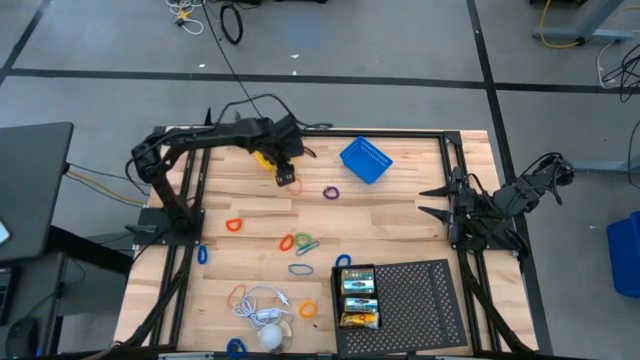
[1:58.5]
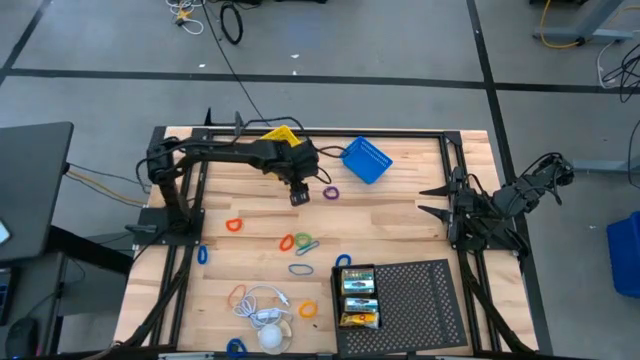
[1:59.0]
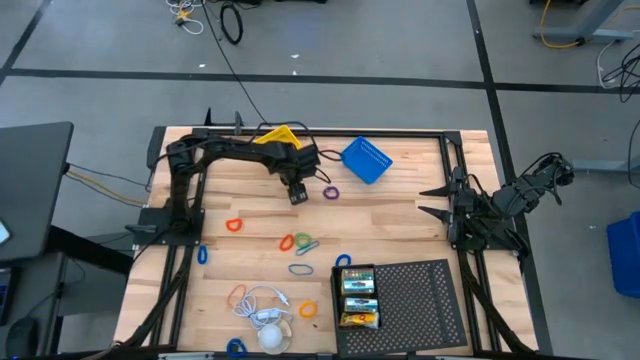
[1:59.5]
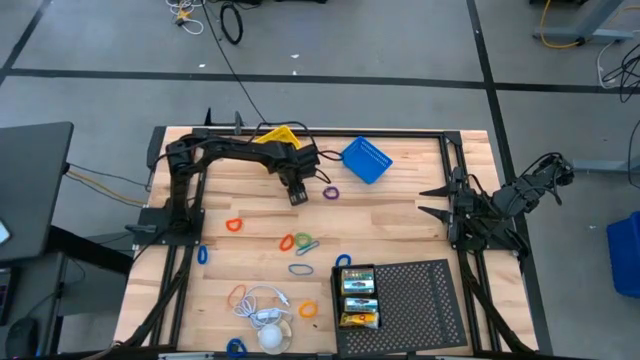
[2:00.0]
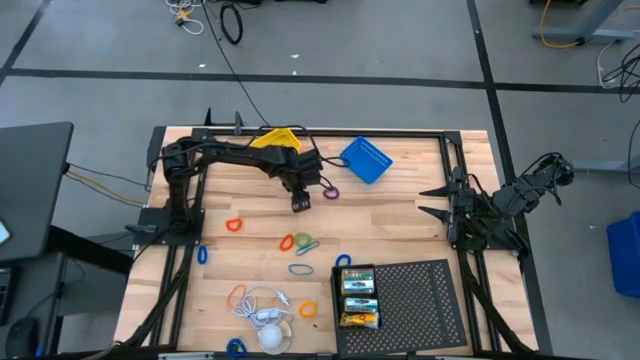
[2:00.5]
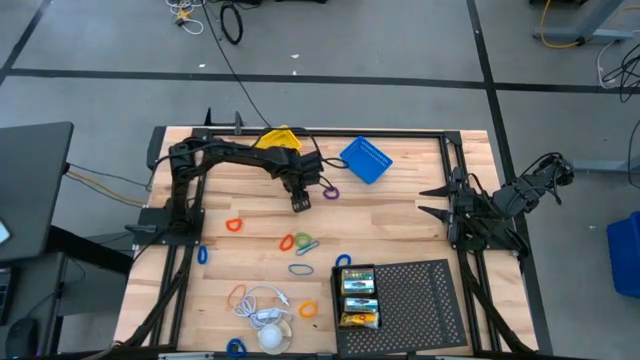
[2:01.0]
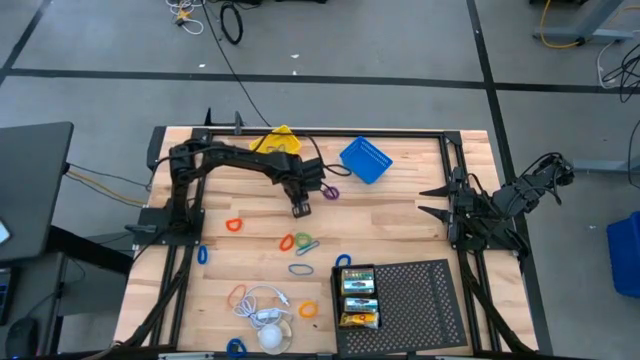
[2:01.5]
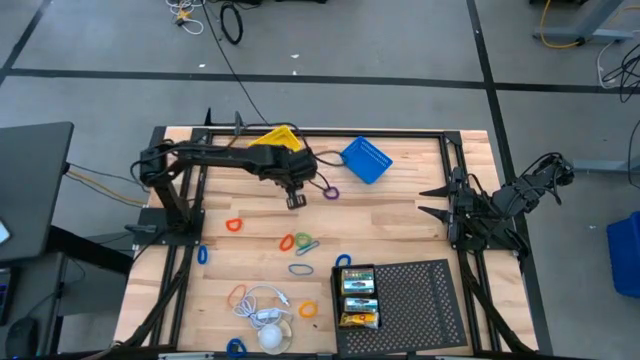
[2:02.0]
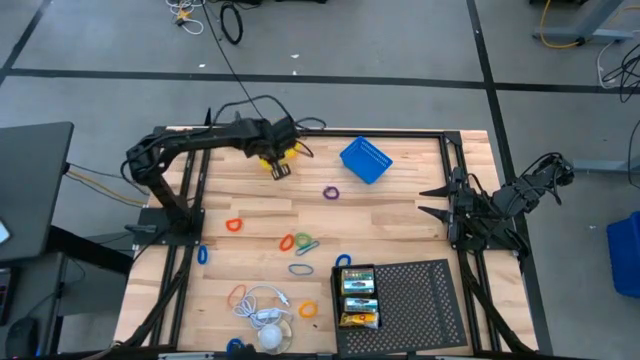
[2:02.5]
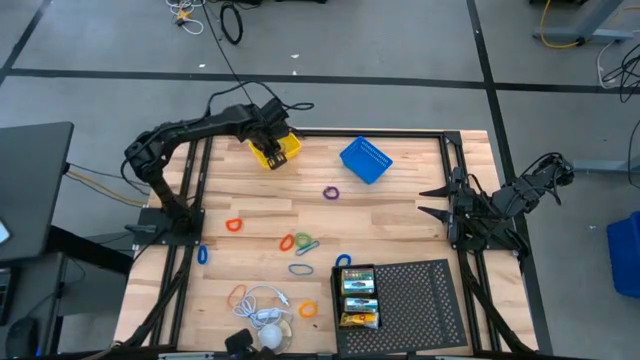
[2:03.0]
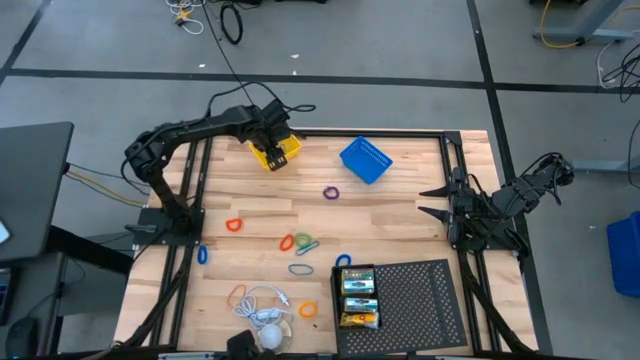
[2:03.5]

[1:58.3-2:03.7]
Task: Pick & Place Office Desk Supplies
Put the orange rubber band into the yellow basket

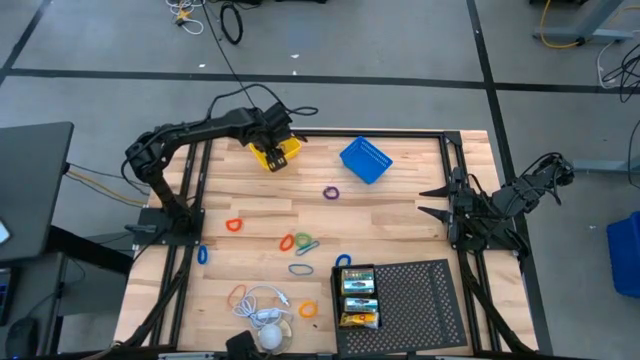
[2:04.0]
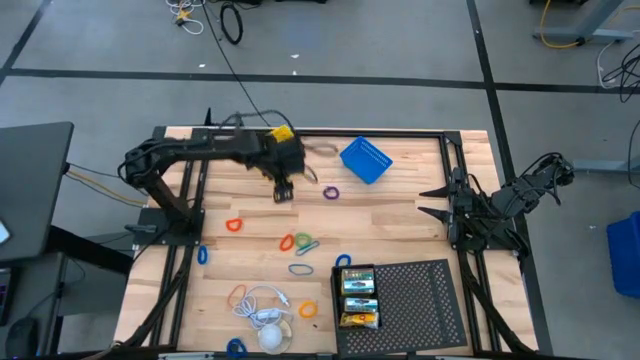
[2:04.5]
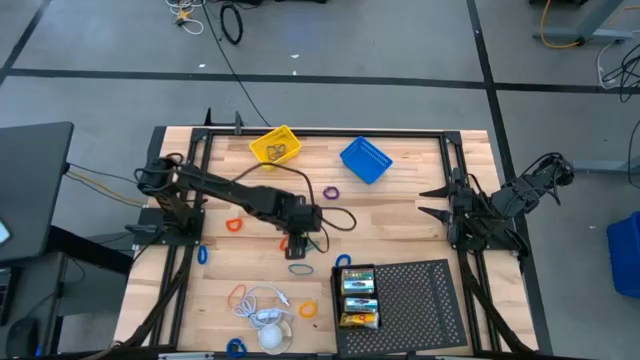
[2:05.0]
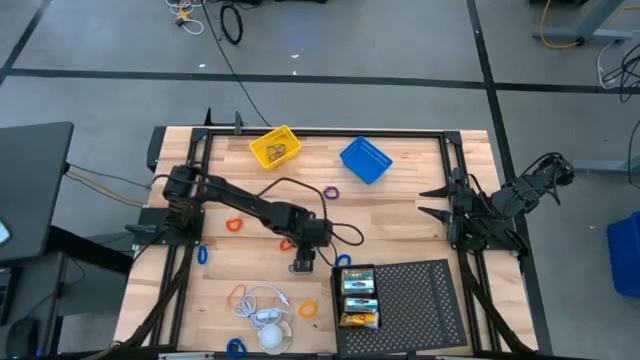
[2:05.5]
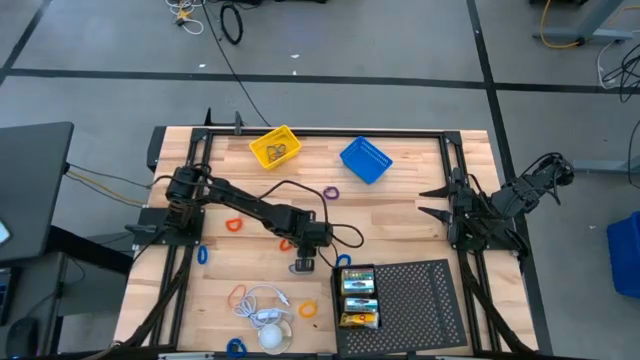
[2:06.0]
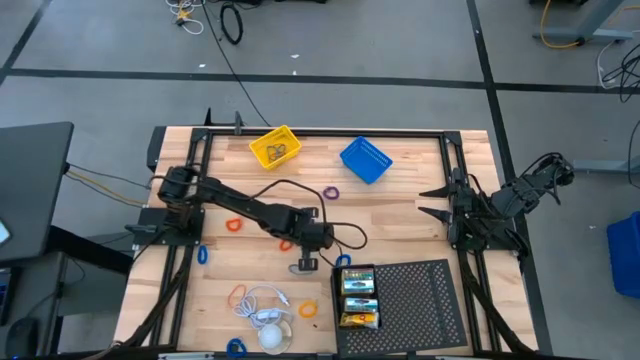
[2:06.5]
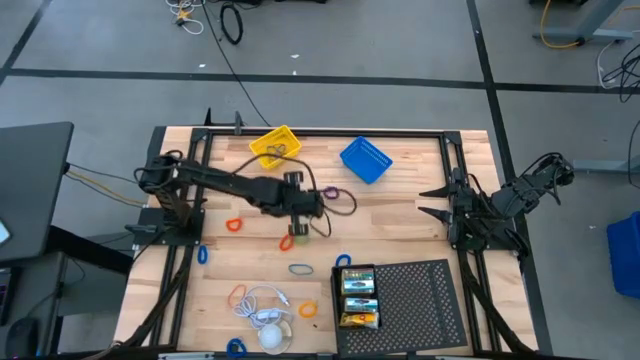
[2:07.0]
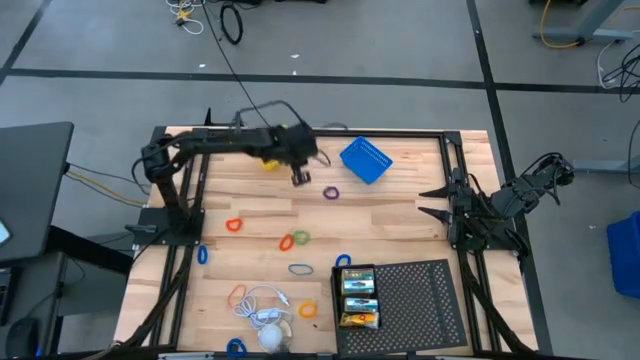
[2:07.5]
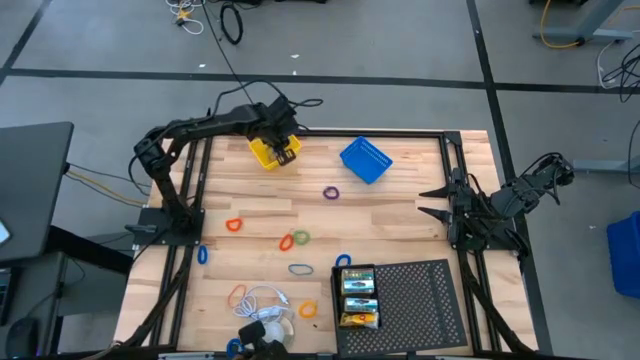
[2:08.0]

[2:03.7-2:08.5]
Put the blue rubber band into the yellow basket

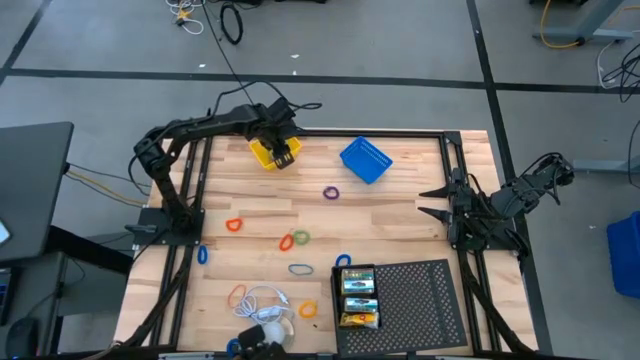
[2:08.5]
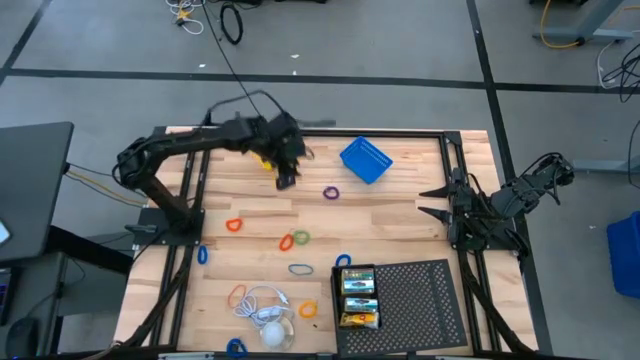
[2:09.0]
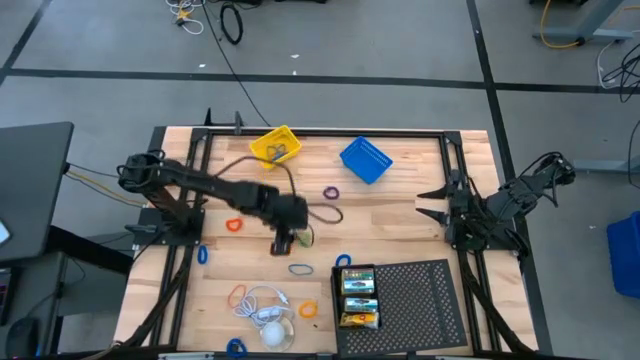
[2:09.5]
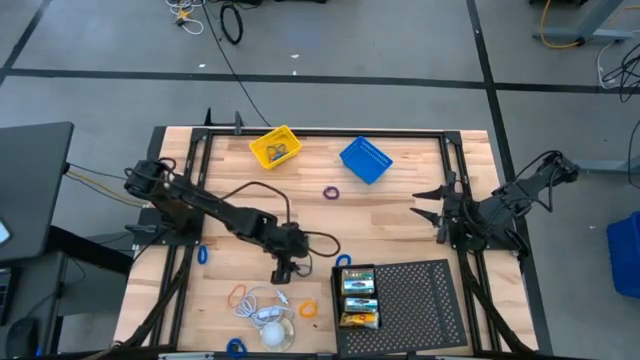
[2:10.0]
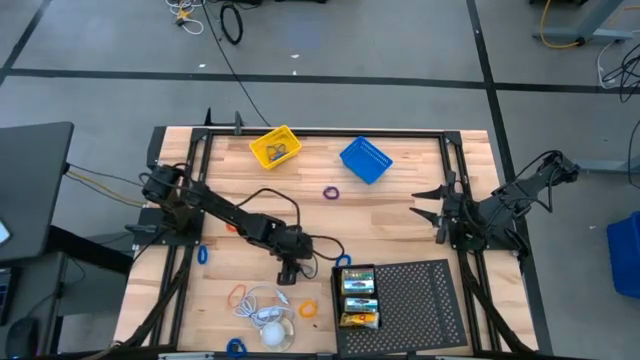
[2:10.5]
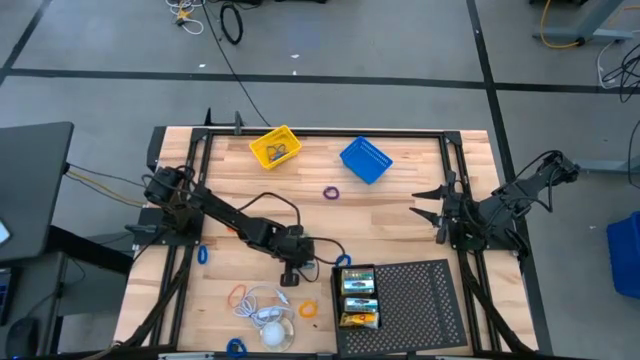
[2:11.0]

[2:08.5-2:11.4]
Put the blue rubber band into the yellow basket

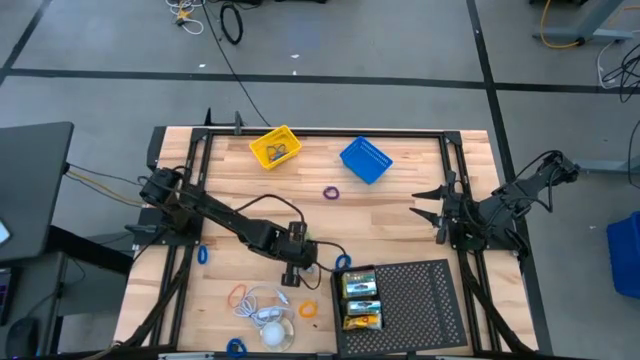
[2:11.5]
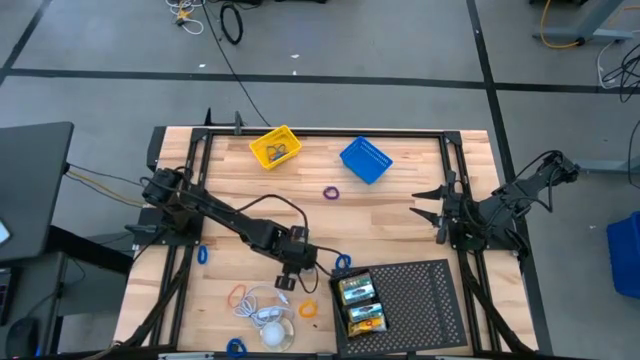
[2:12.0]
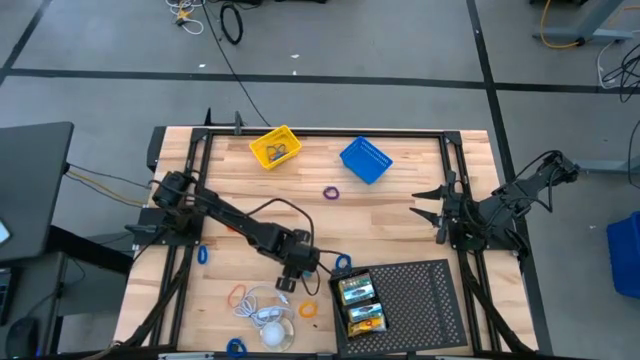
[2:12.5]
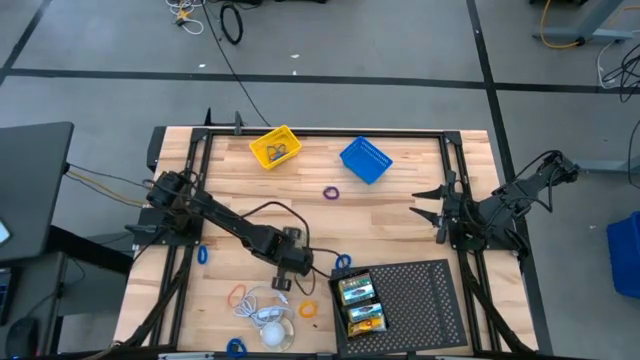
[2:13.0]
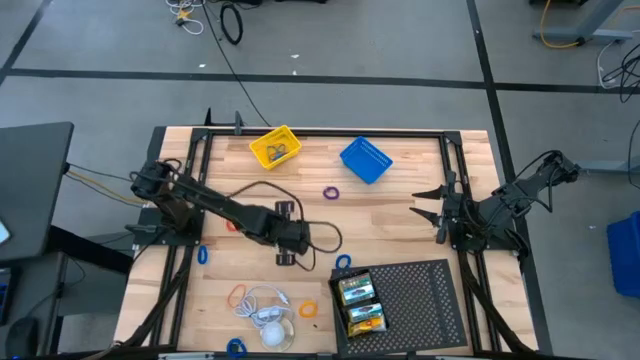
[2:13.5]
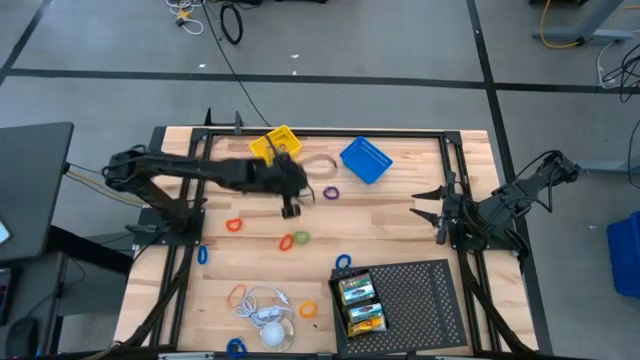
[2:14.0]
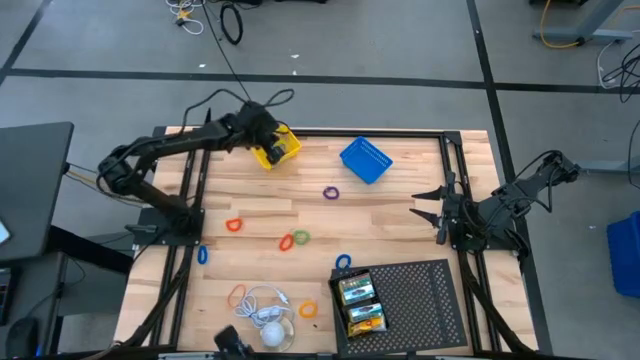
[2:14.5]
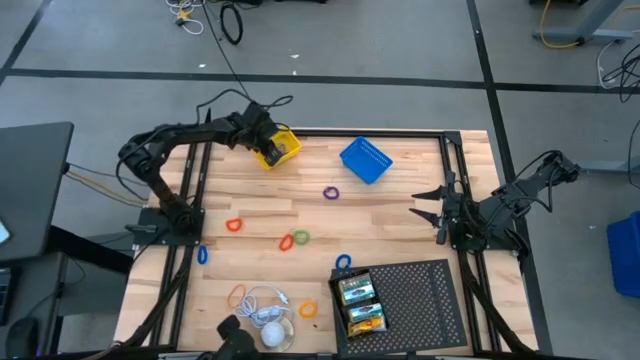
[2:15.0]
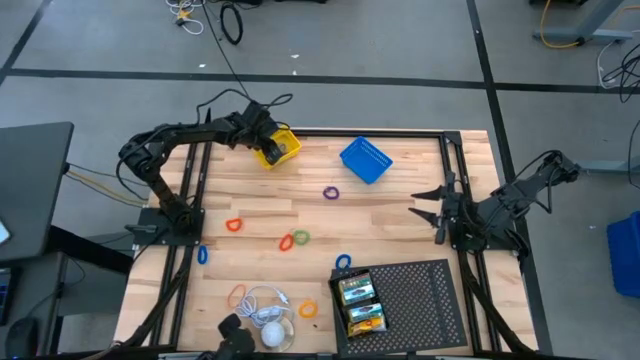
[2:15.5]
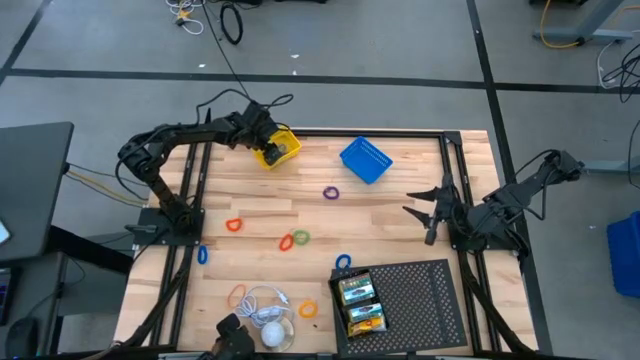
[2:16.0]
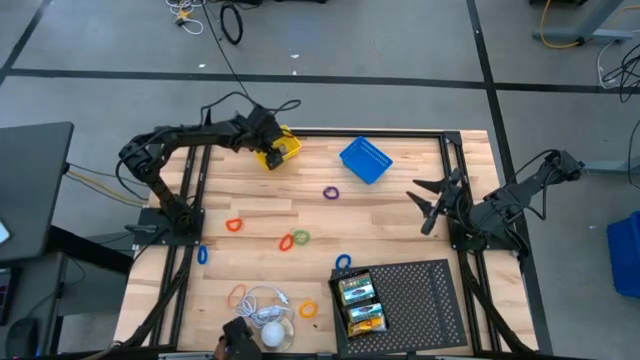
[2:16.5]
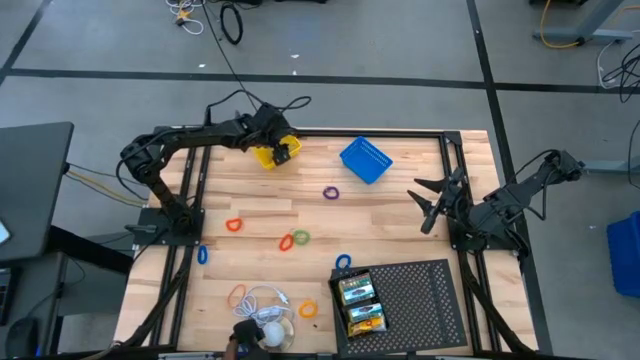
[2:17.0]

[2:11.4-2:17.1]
Put the blue rubber band into the yellow basket

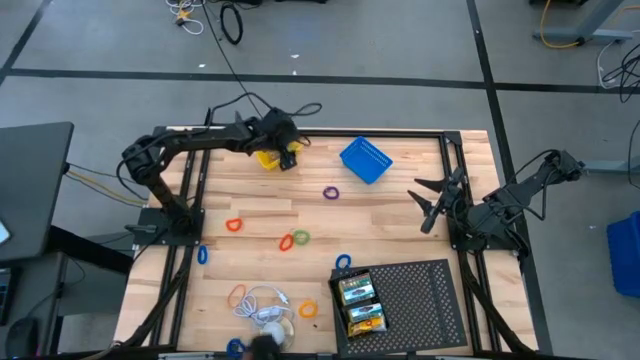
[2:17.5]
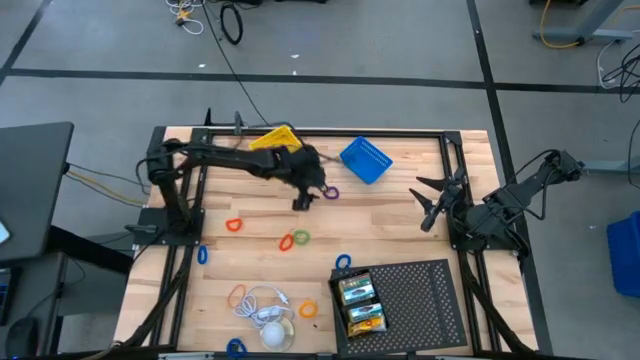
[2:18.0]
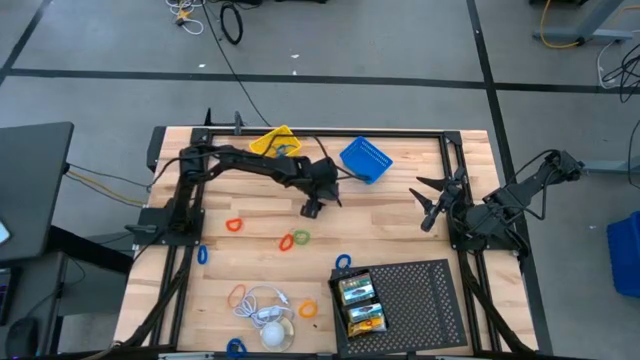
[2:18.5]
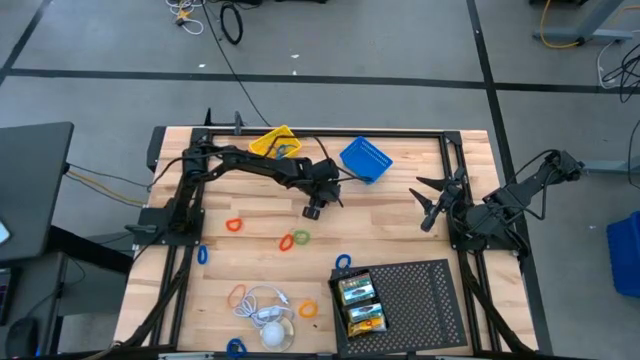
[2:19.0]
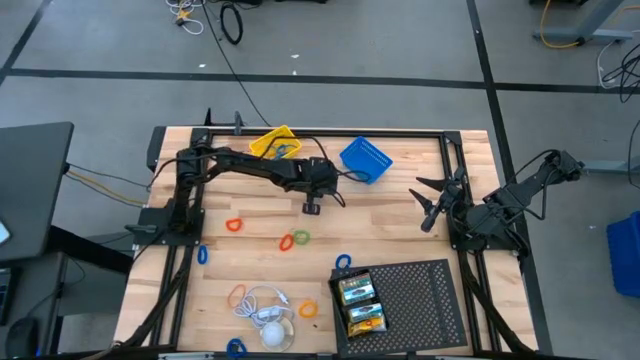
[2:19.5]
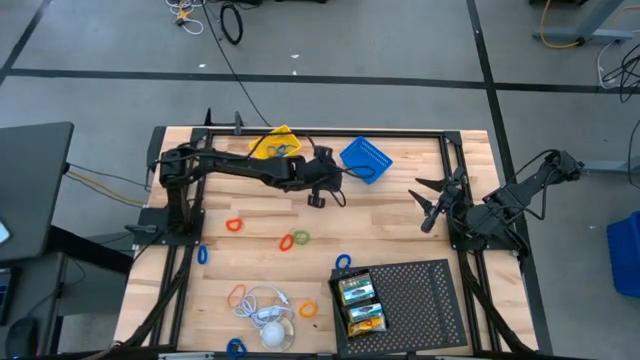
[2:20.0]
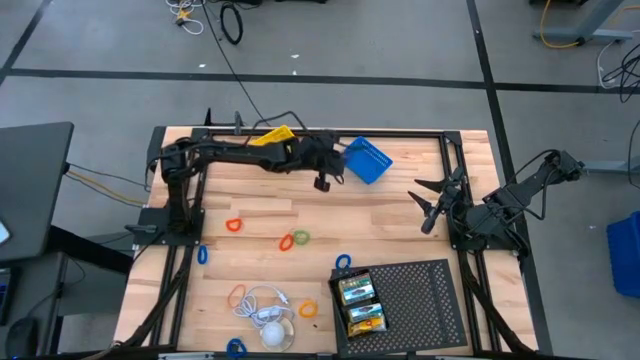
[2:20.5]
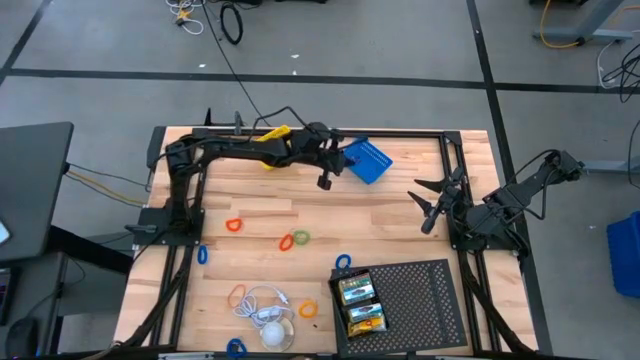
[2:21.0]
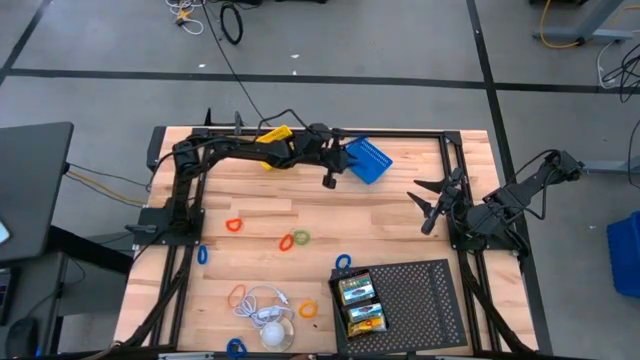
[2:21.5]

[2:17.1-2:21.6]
Put the violet spring keychain into the blue basket
